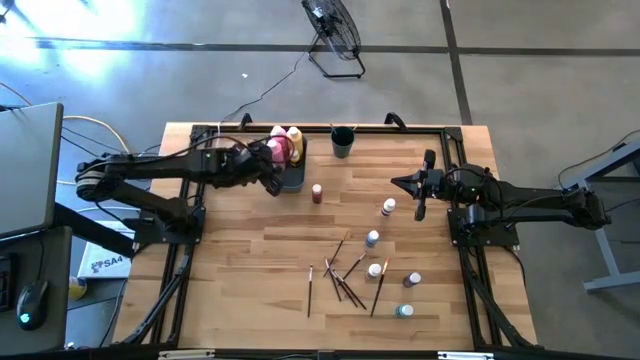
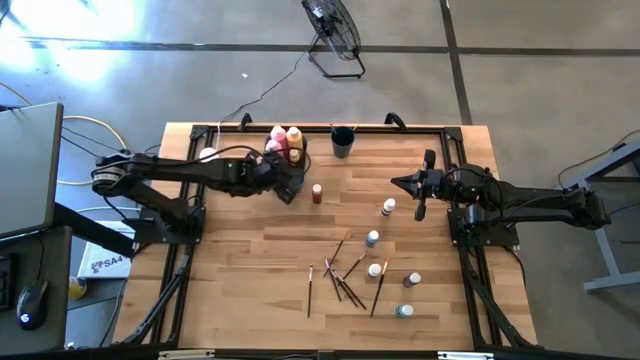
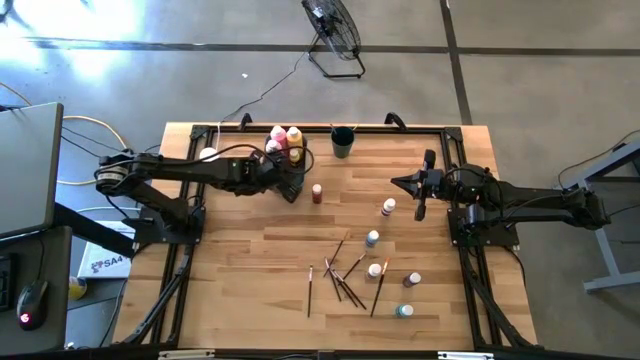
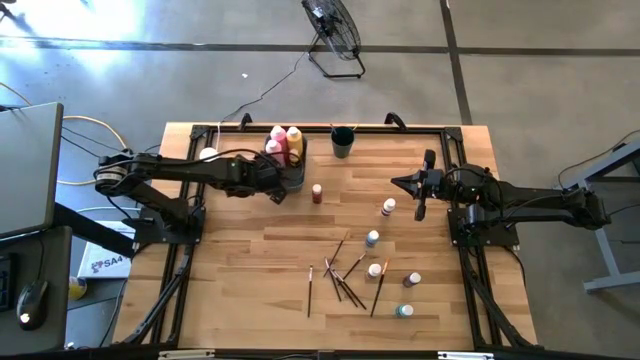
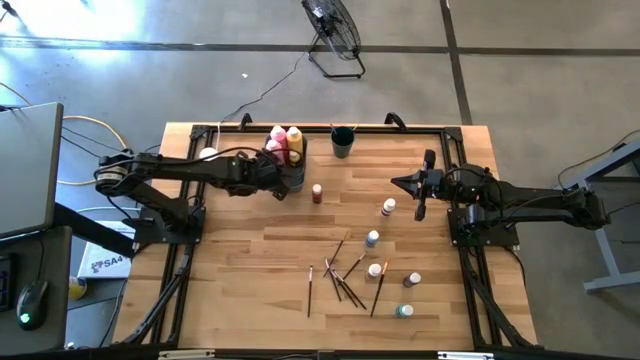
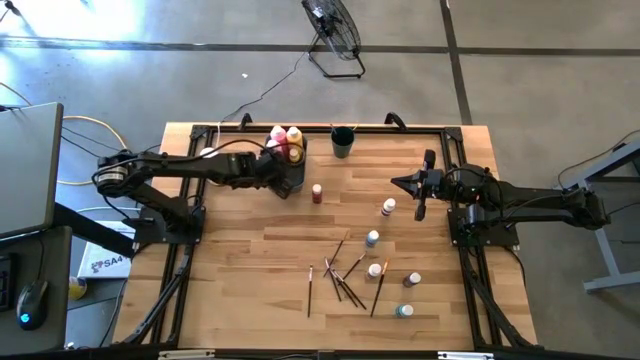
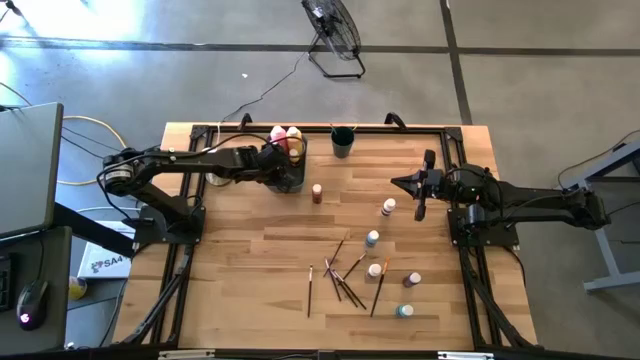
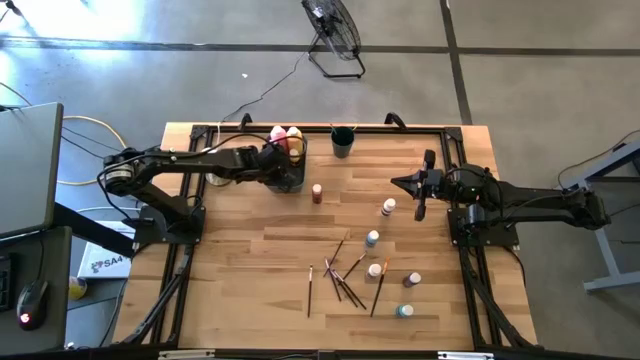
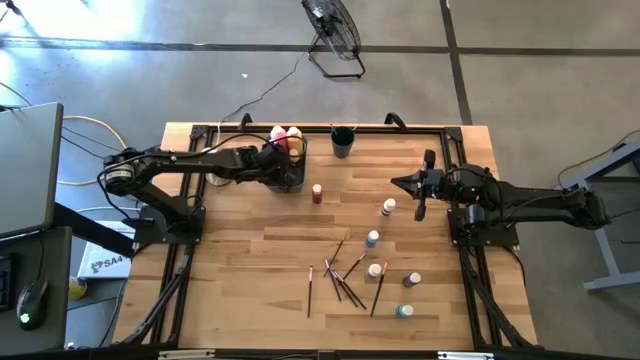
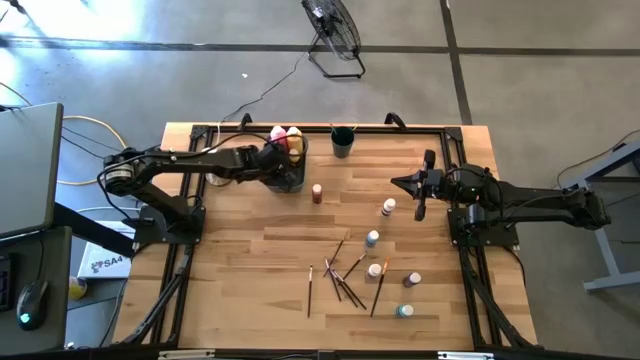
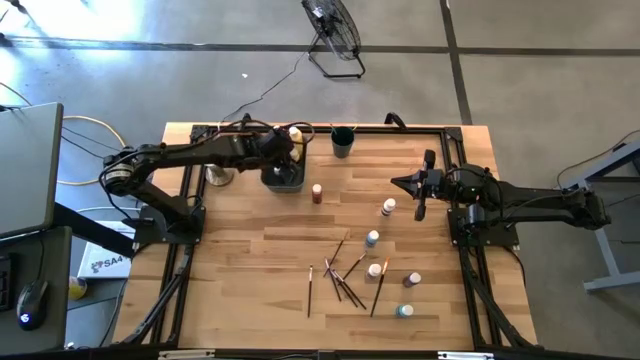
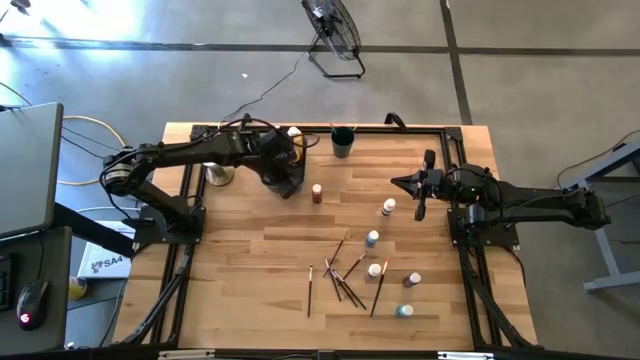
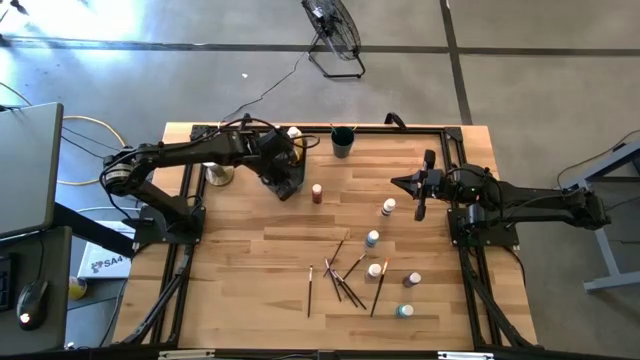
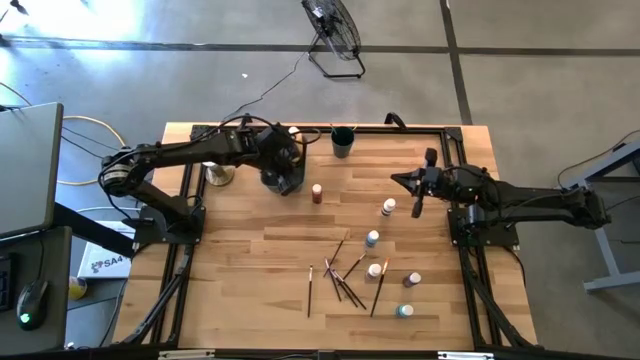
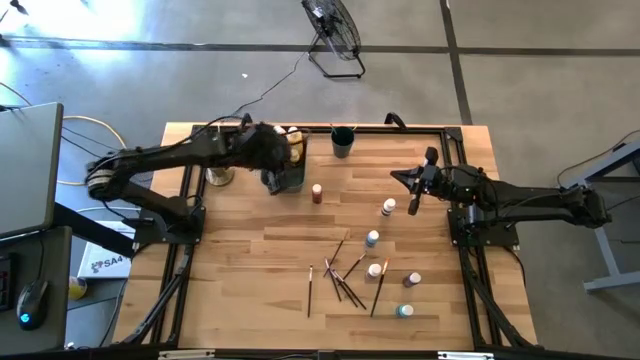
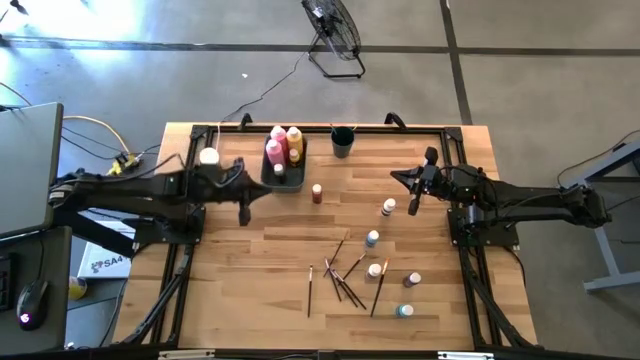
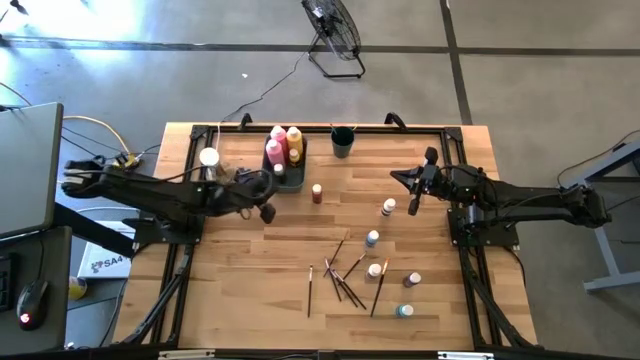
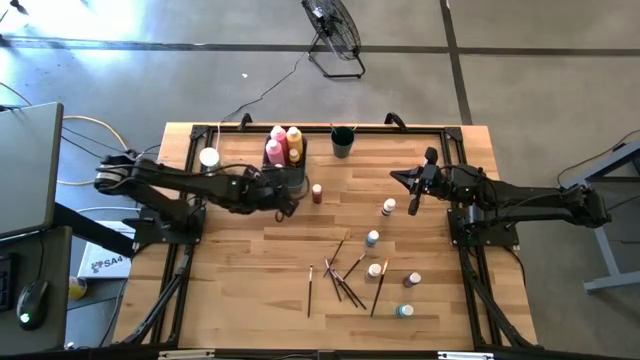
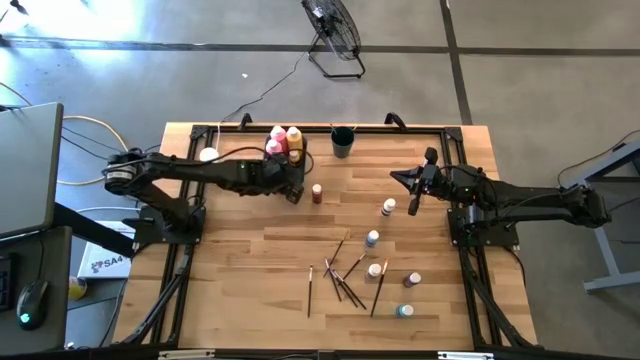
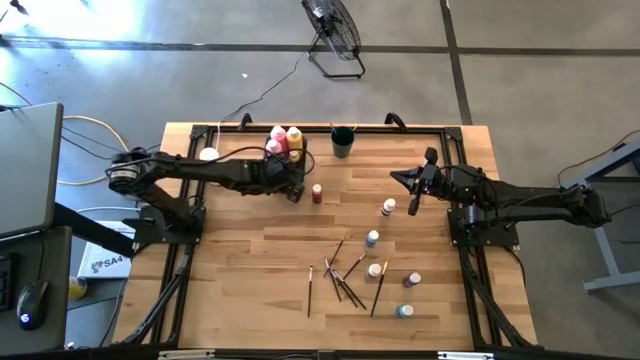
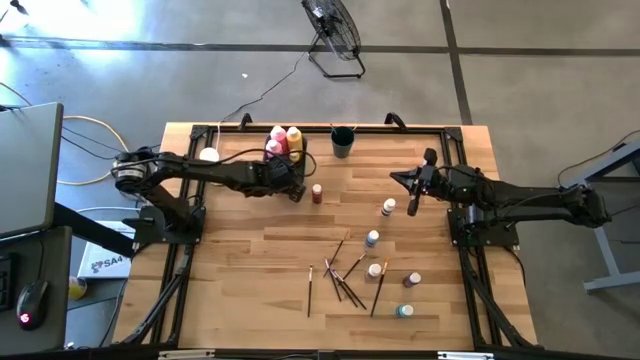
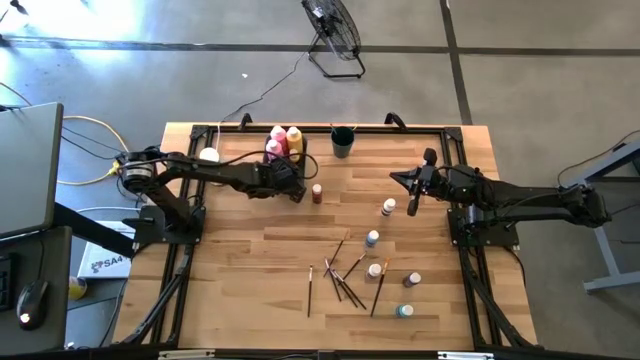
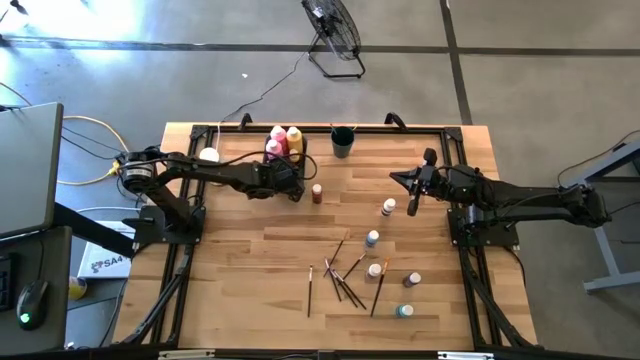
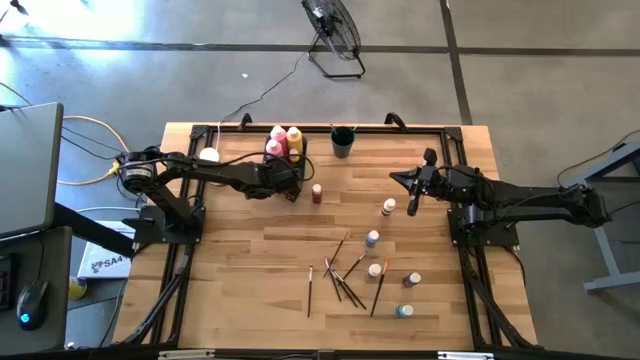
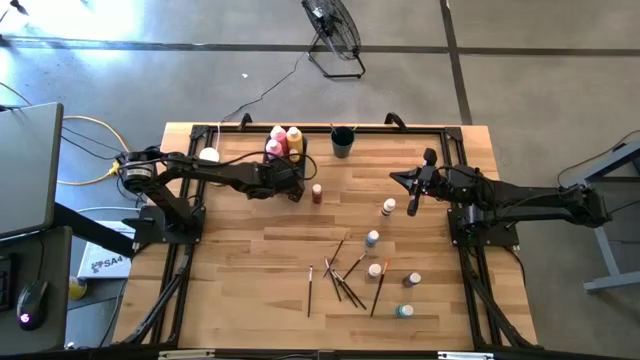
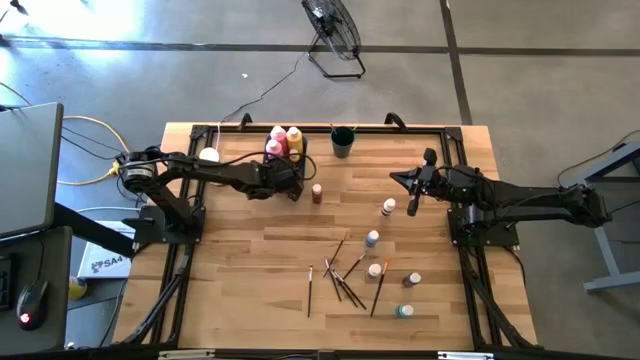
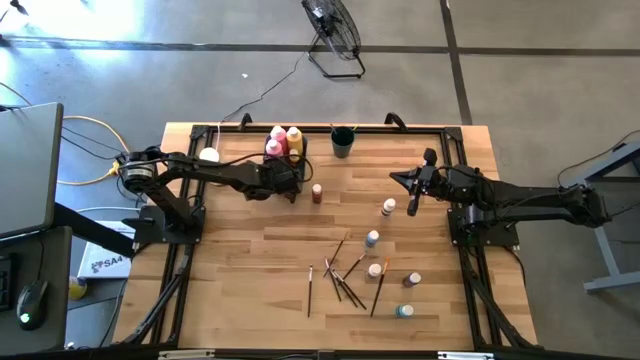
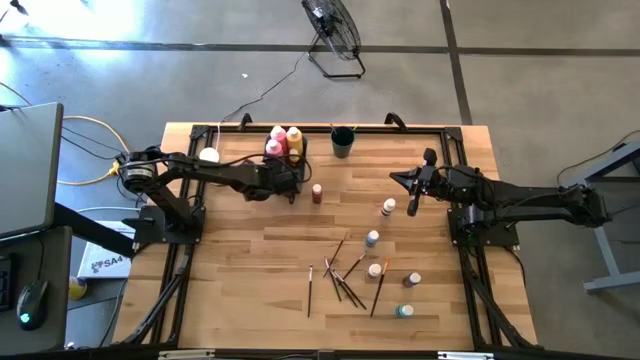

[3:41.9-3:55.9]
Task: Pick & Place Paint Supplies
Put the small green paint bottle into the green bin

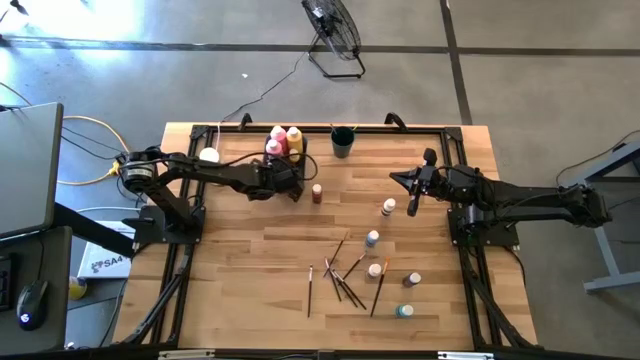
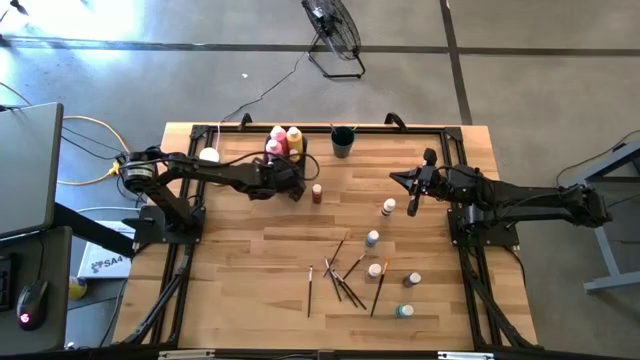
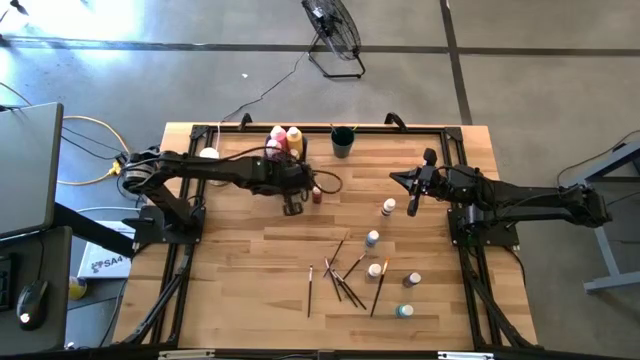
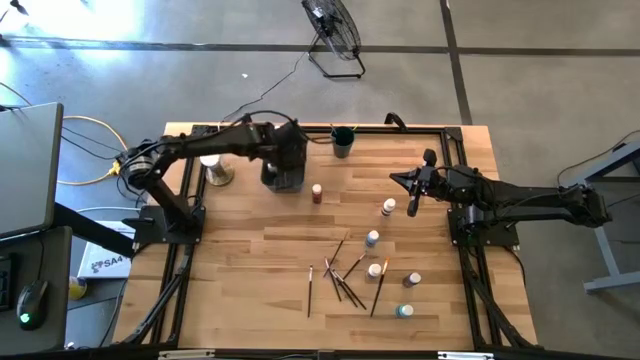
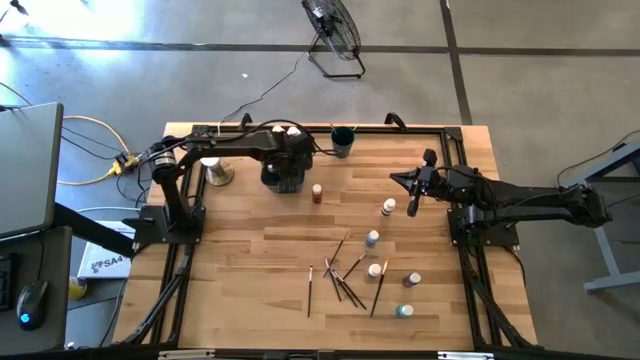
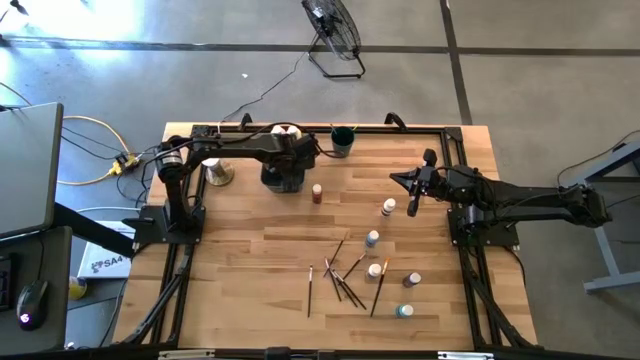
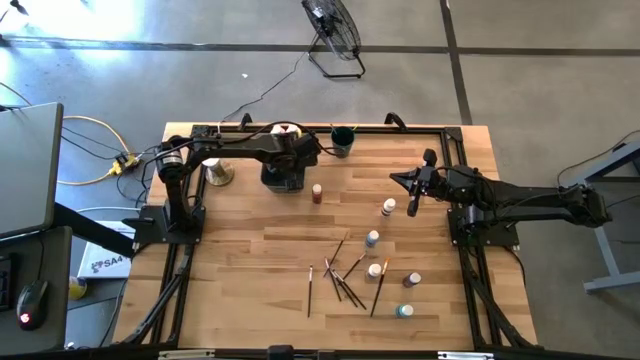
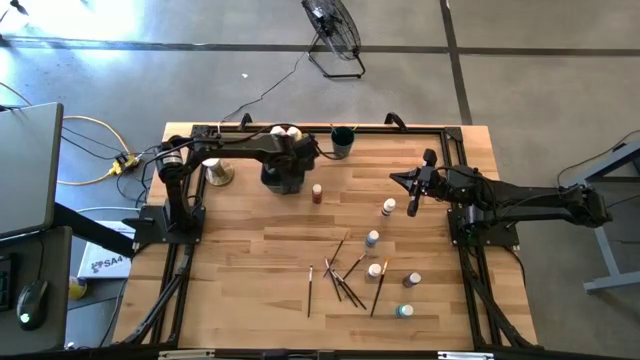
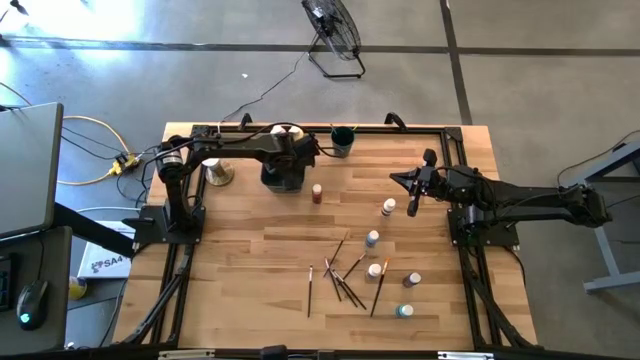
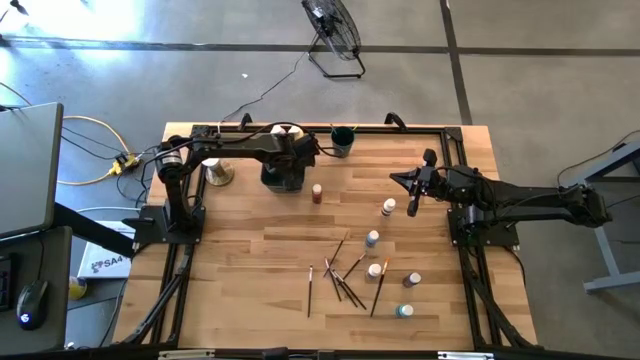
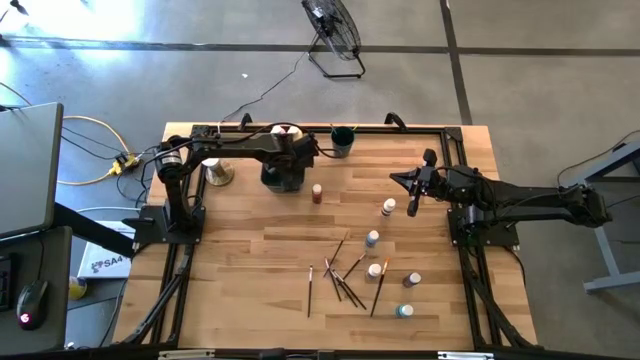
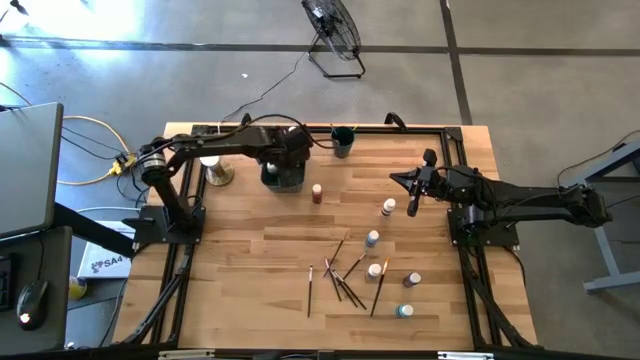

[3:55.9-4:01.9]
Adjust the small yellow paint bottle
